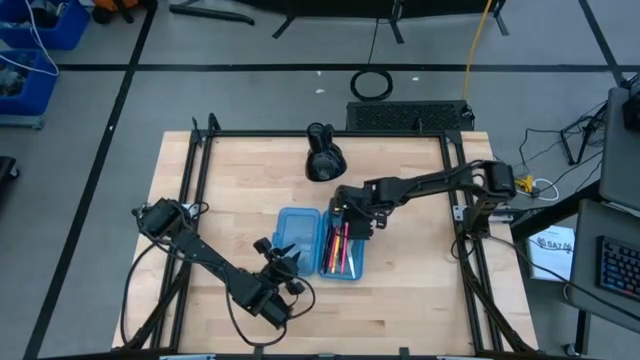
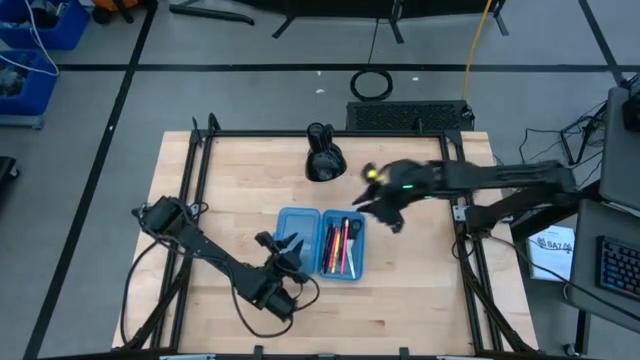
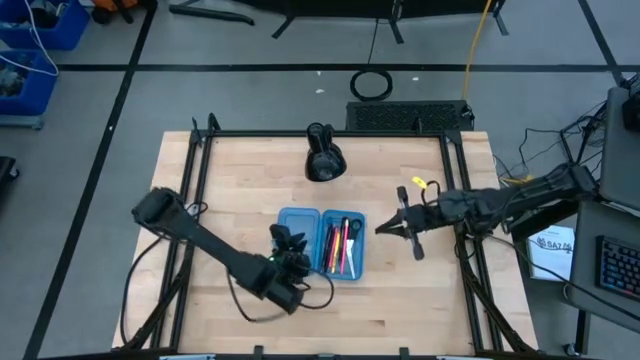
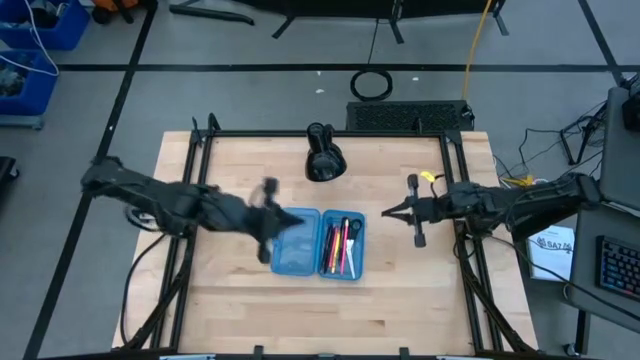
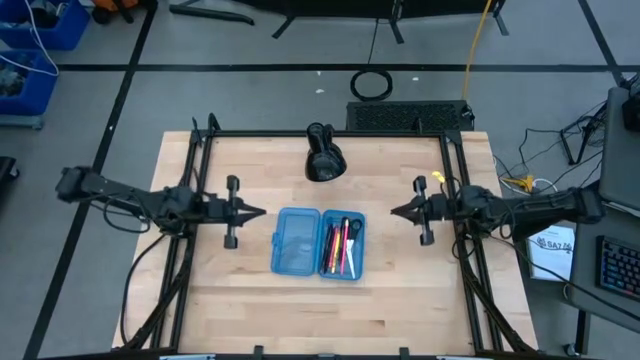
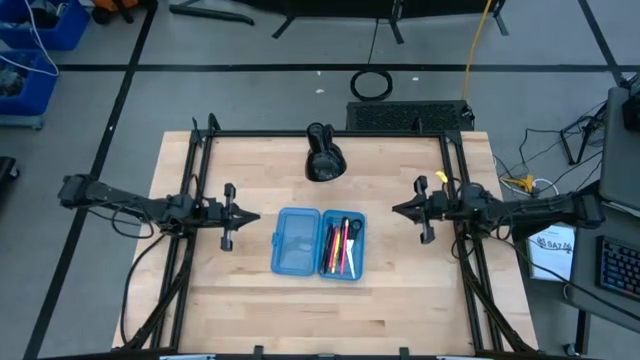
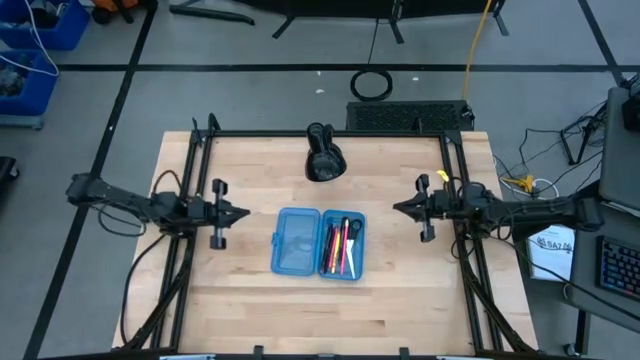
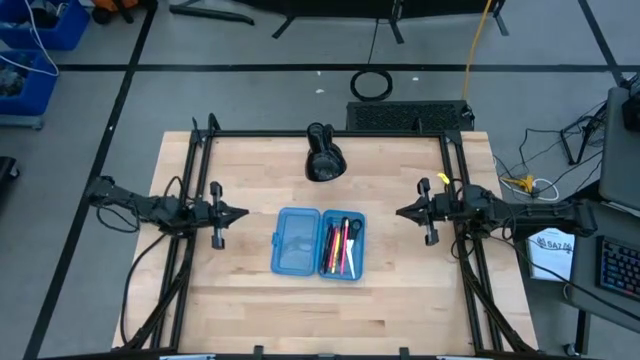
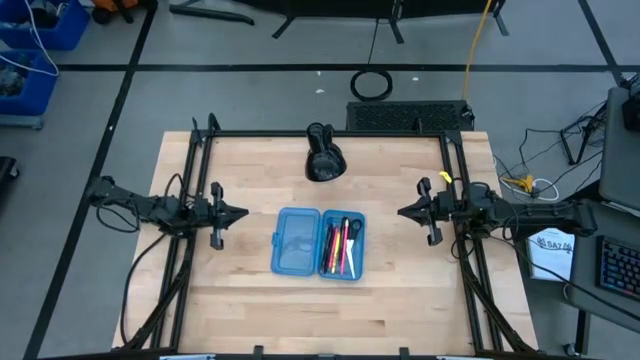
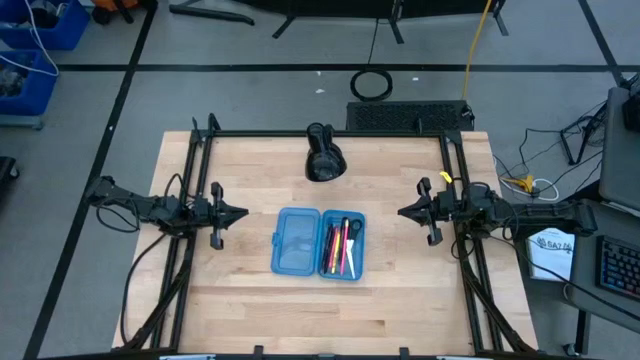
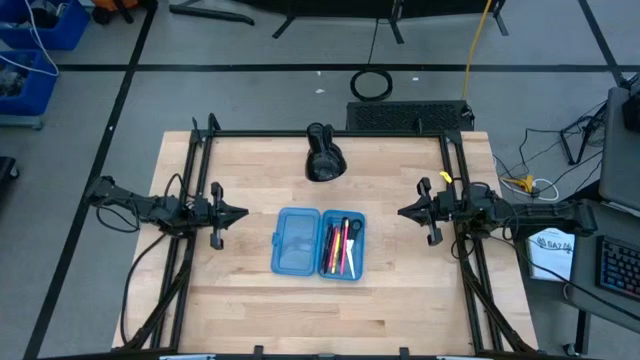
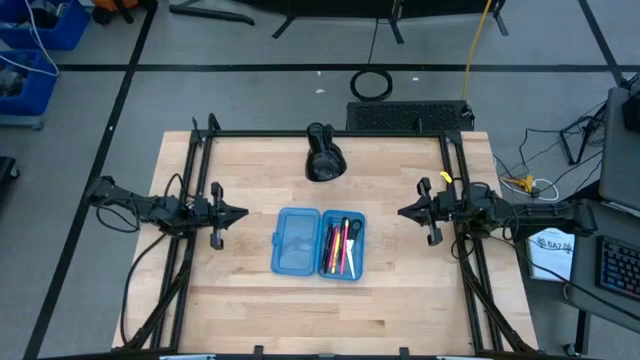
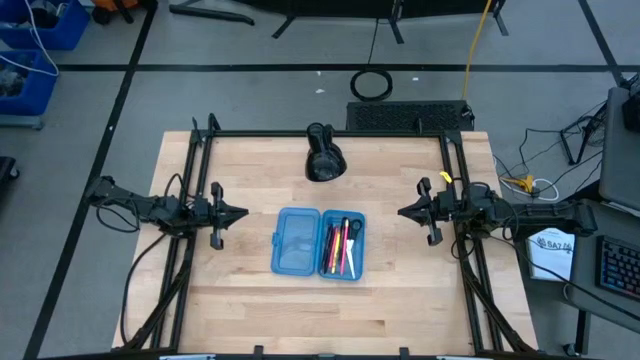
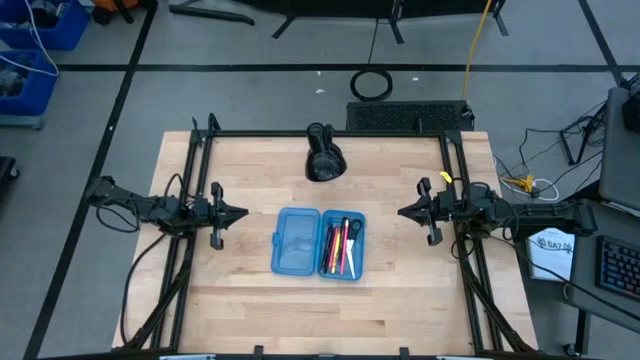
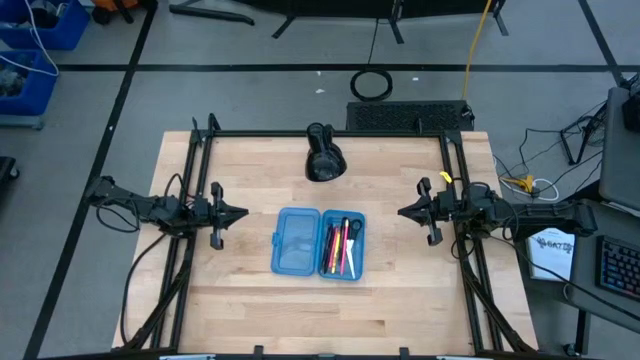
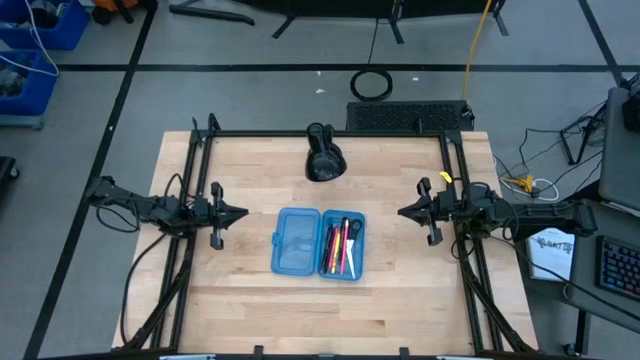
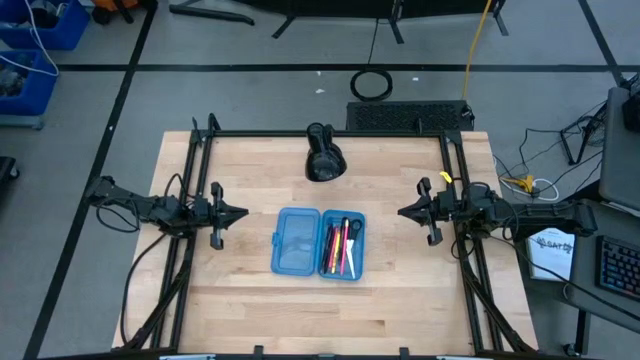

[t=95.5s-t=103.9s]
Task: Pick & place school supplies into a supply box
Return to Home Position

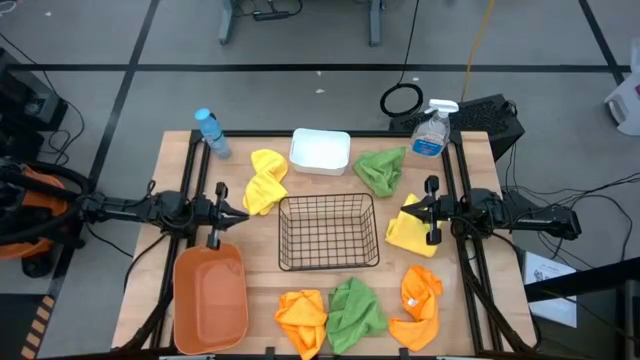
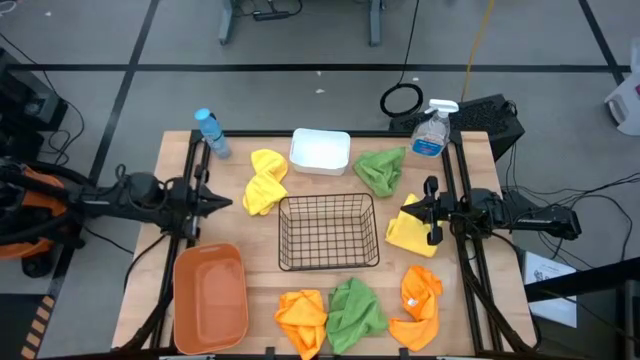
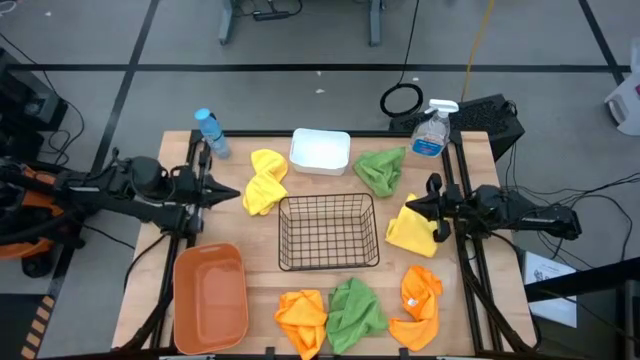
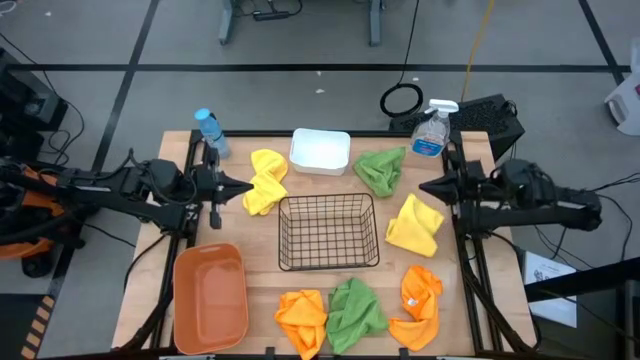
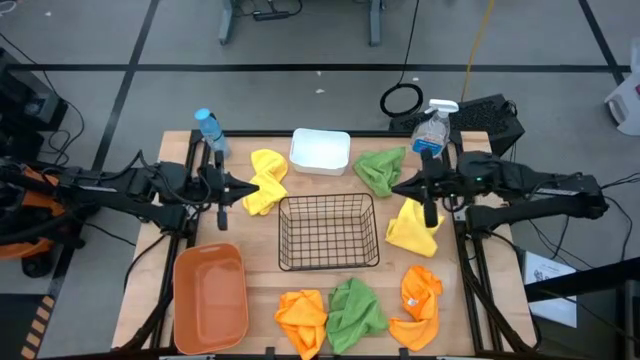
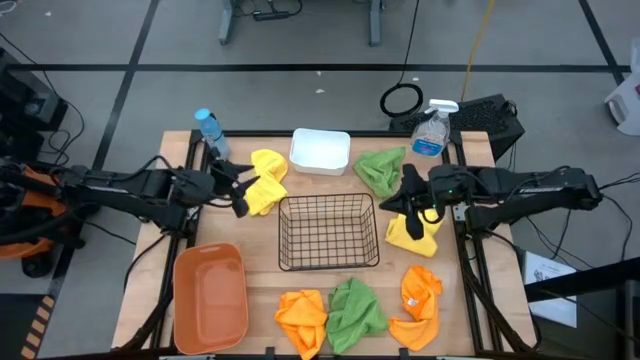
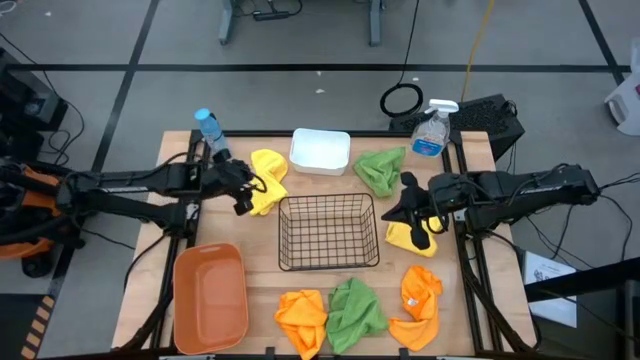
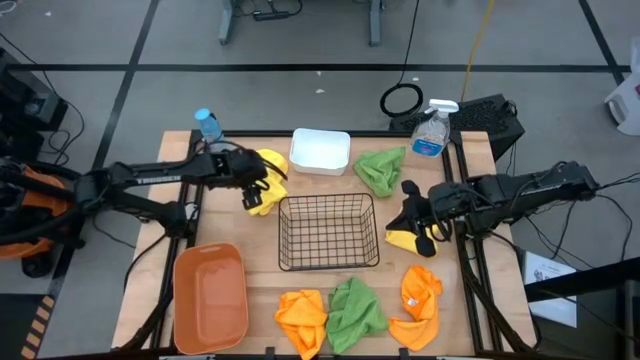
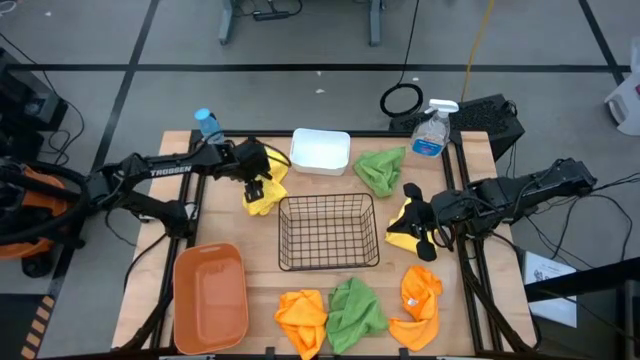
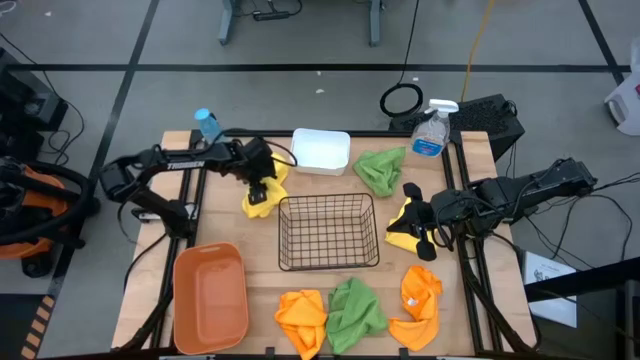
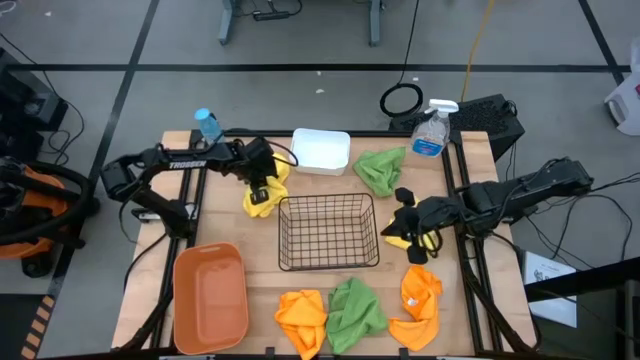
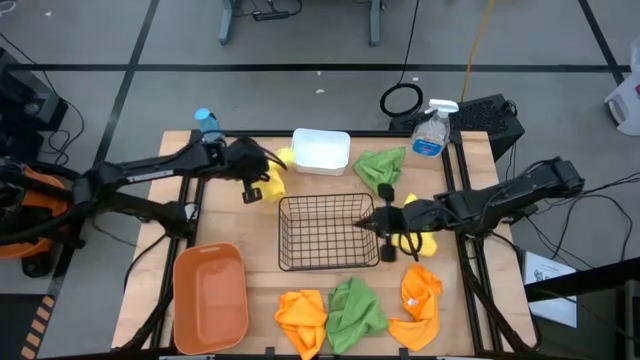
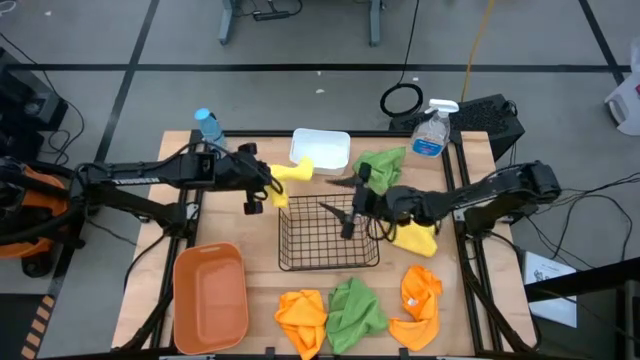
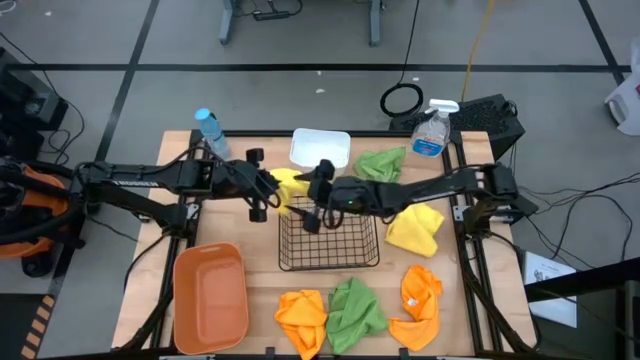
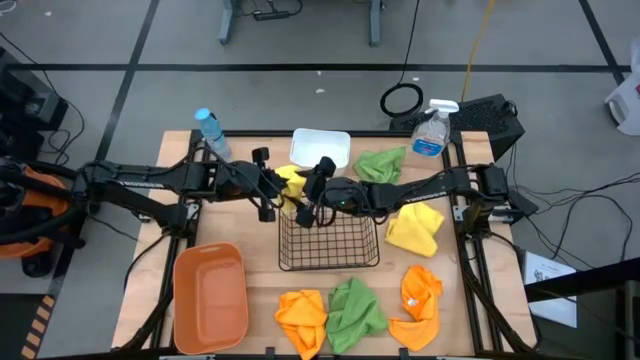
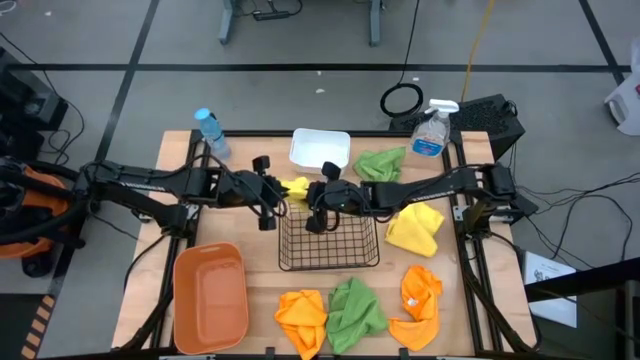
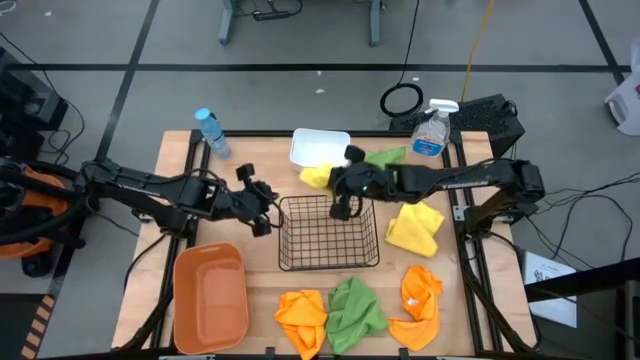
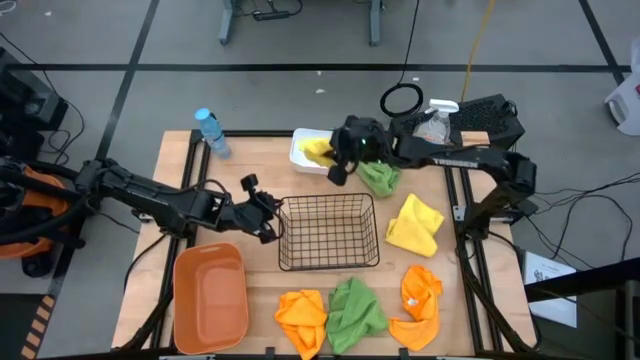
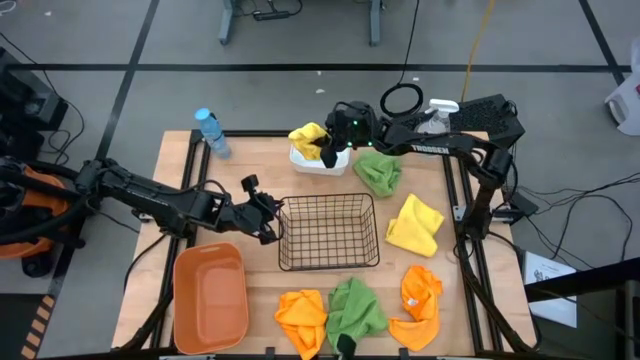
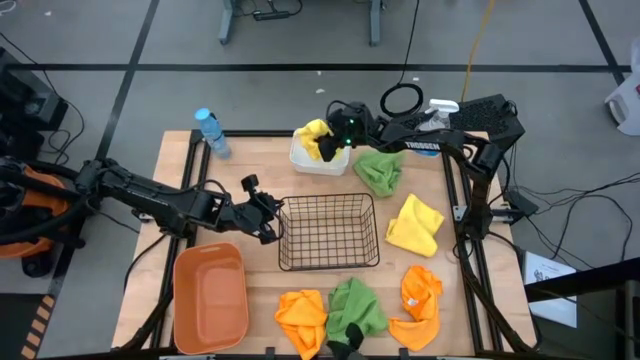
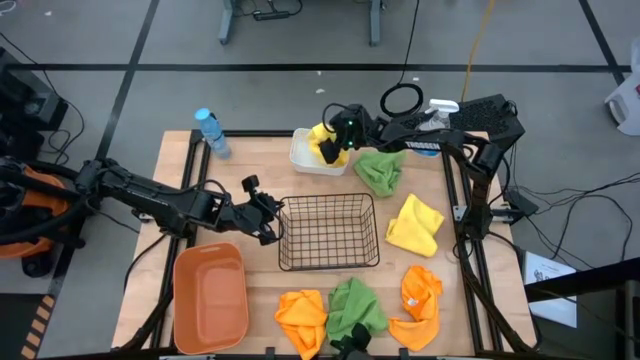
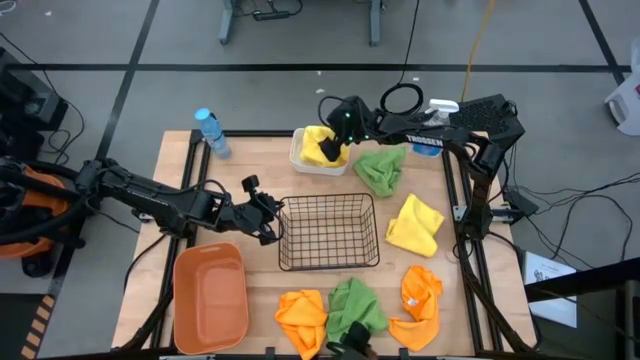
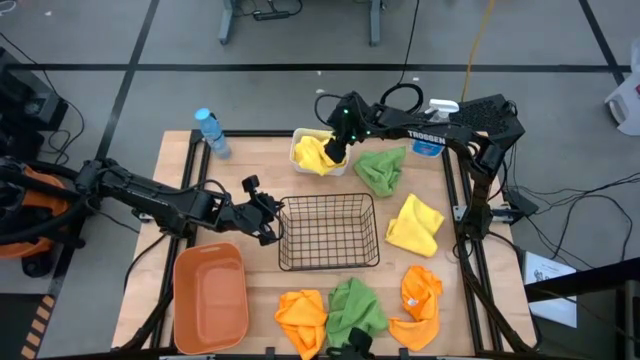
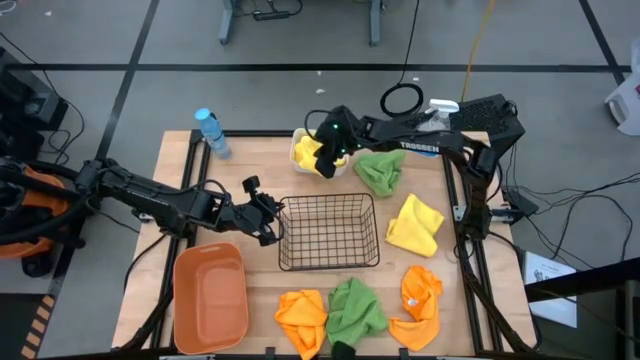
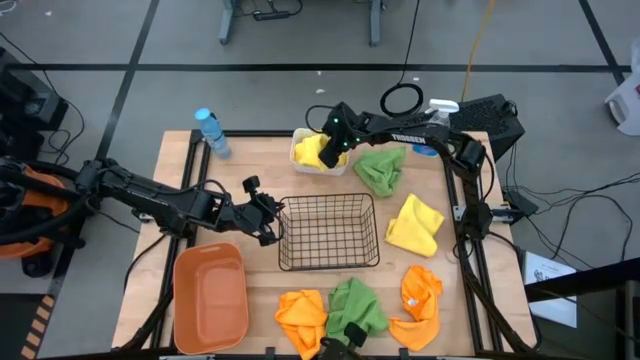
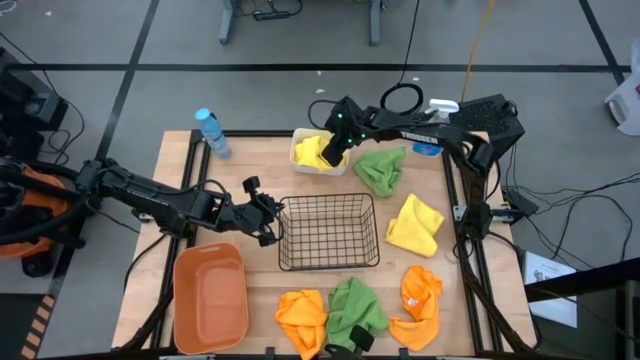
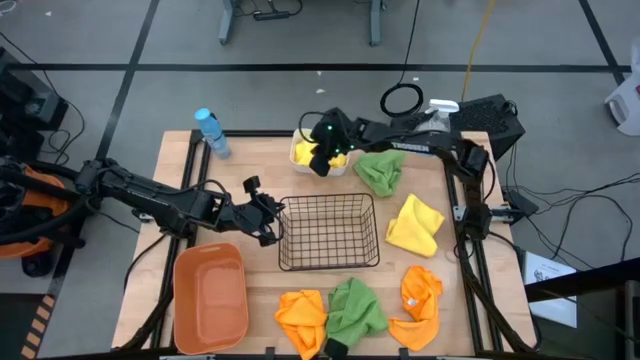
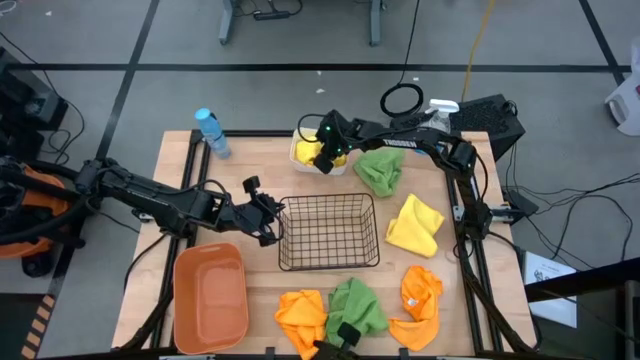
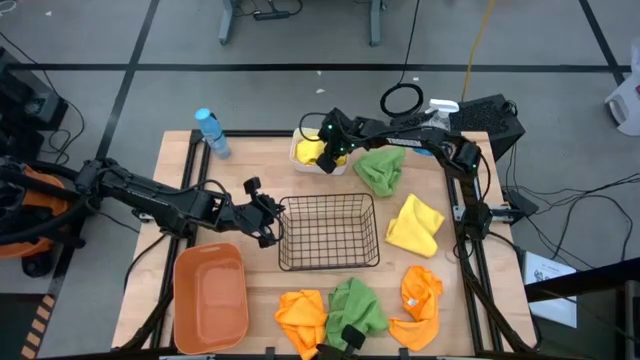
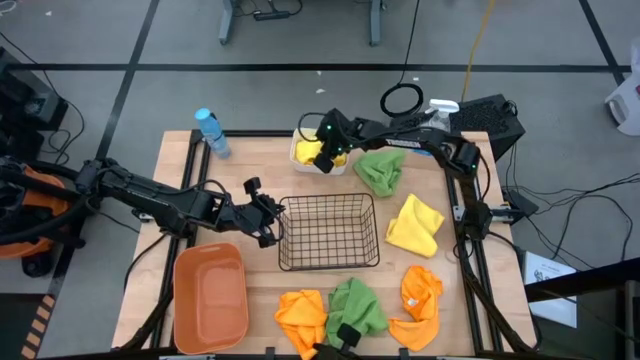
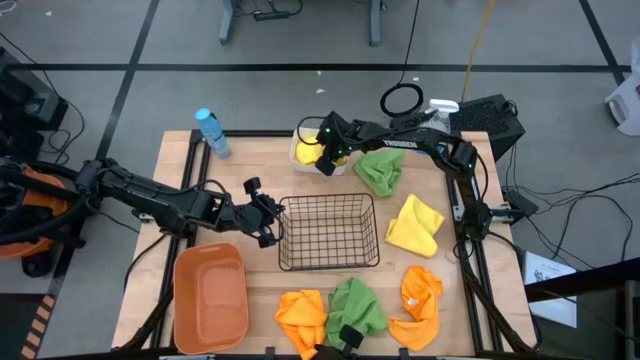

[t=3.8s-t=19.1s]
Task: Sort microfiber towel by color & place in baskets
Put the left yellow microfiber cloth into the white bin
